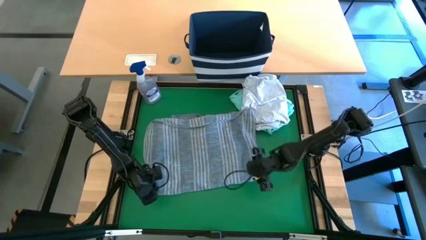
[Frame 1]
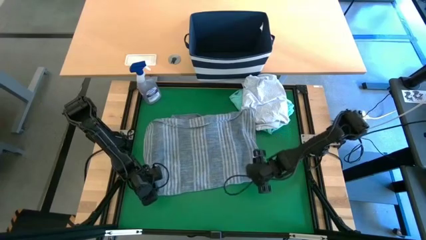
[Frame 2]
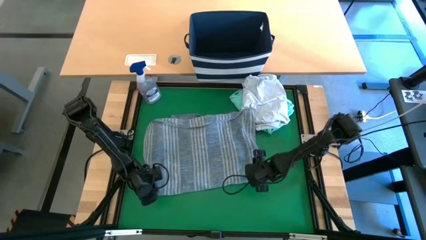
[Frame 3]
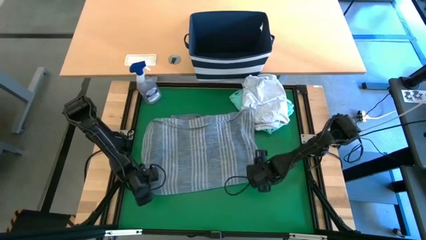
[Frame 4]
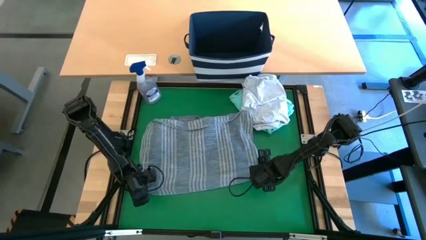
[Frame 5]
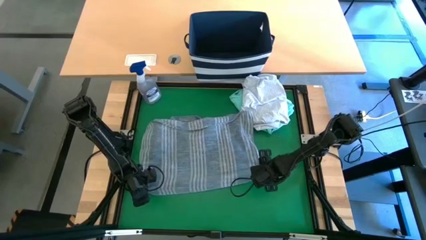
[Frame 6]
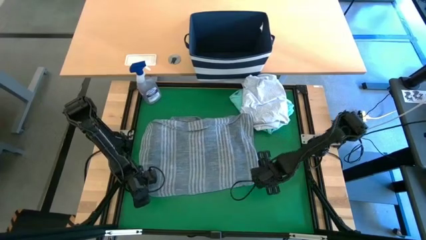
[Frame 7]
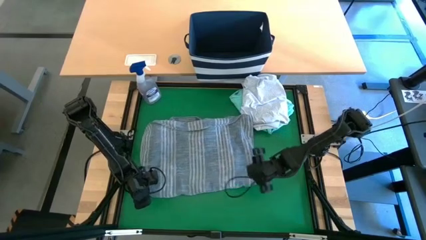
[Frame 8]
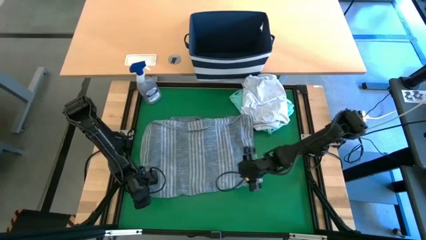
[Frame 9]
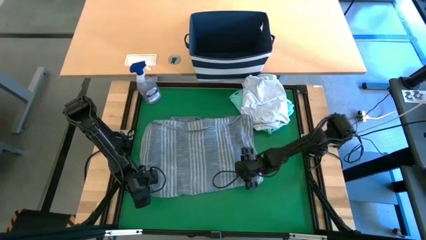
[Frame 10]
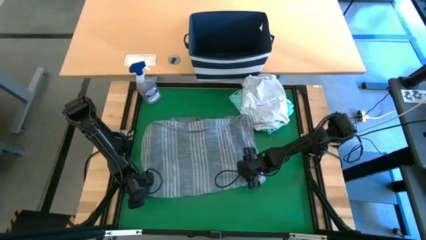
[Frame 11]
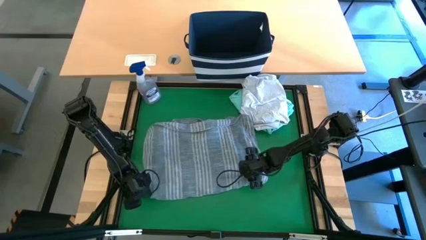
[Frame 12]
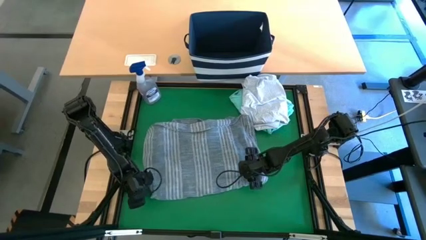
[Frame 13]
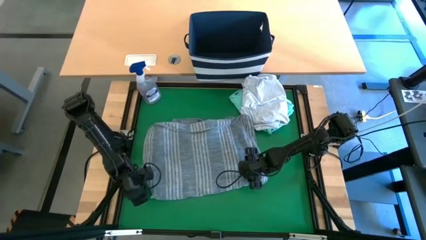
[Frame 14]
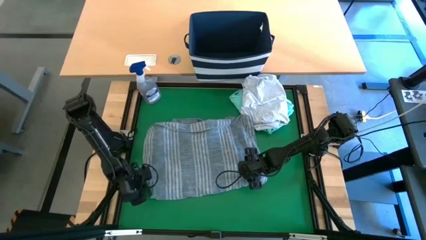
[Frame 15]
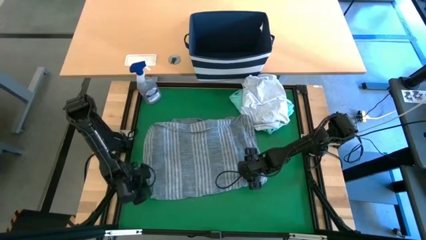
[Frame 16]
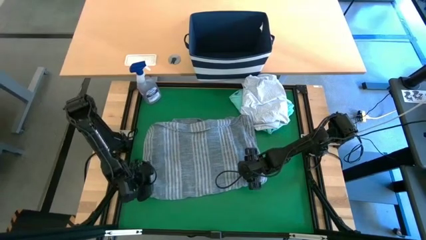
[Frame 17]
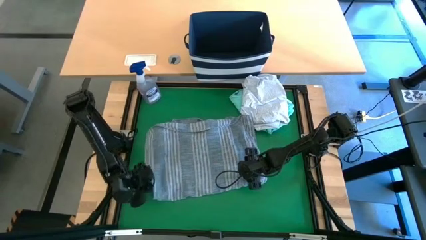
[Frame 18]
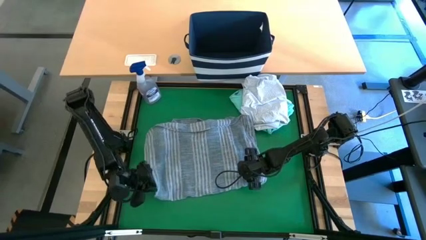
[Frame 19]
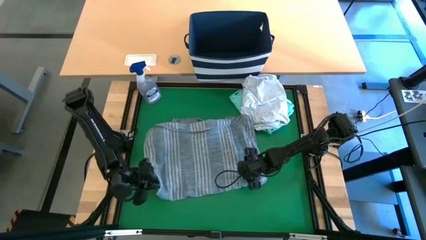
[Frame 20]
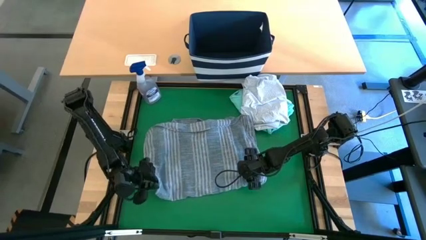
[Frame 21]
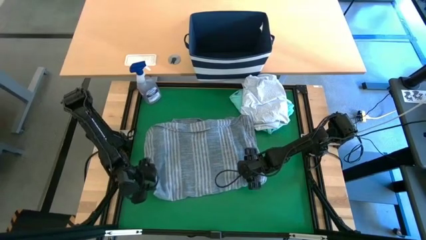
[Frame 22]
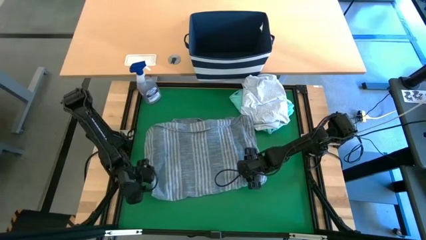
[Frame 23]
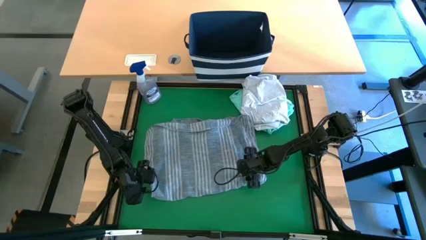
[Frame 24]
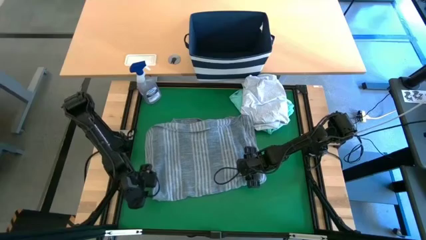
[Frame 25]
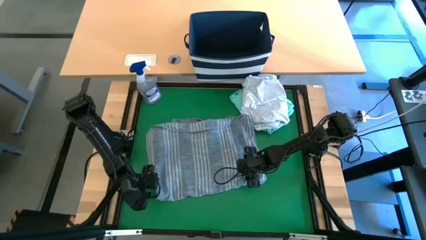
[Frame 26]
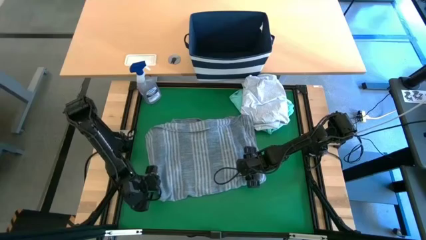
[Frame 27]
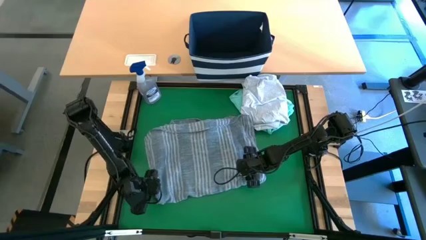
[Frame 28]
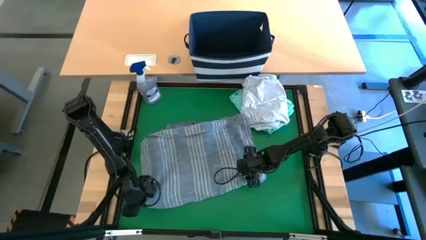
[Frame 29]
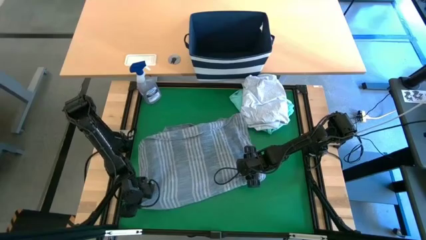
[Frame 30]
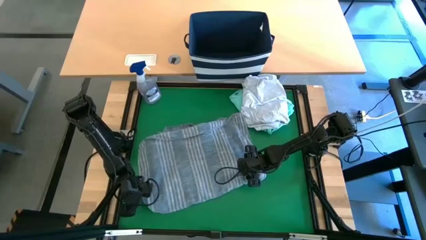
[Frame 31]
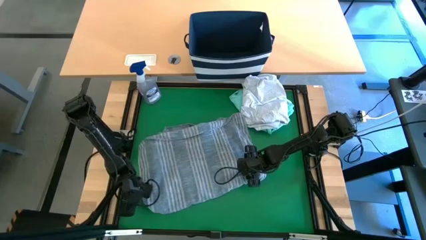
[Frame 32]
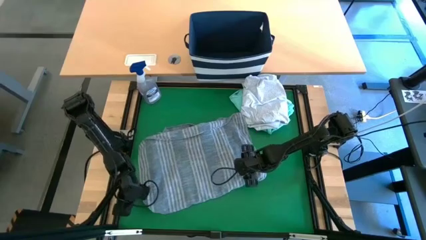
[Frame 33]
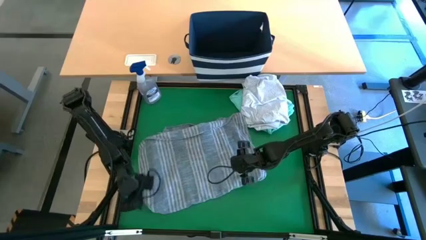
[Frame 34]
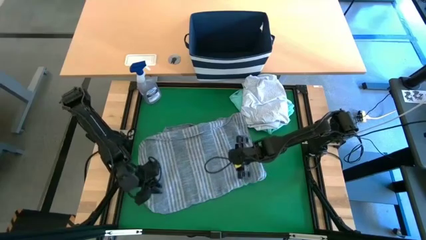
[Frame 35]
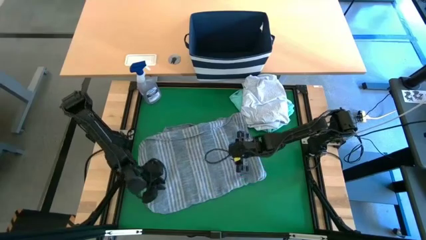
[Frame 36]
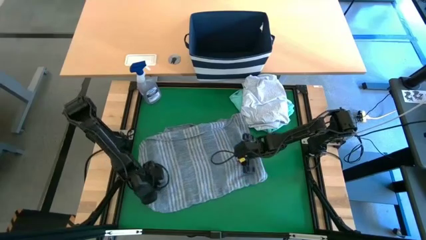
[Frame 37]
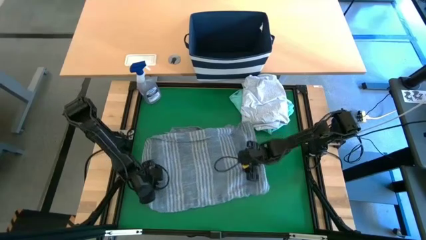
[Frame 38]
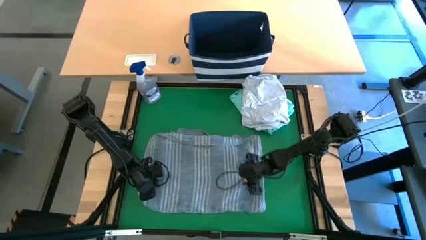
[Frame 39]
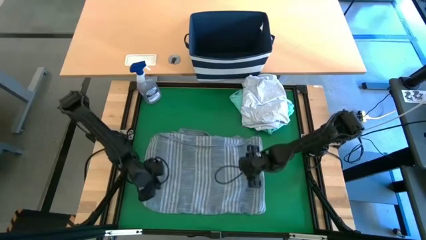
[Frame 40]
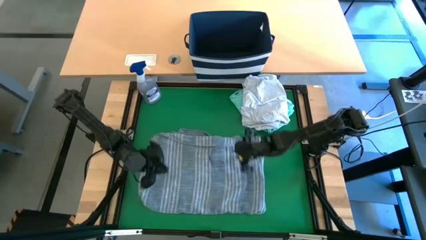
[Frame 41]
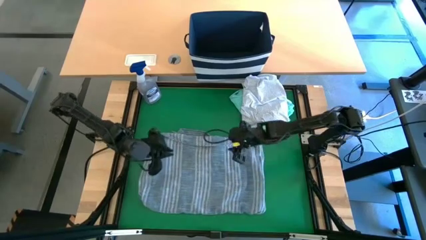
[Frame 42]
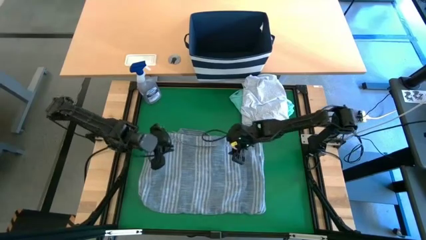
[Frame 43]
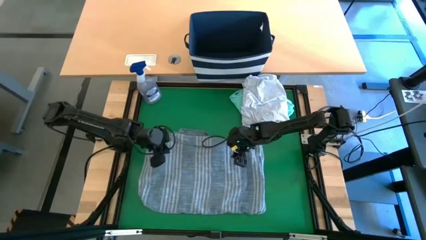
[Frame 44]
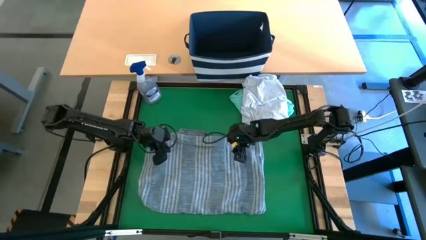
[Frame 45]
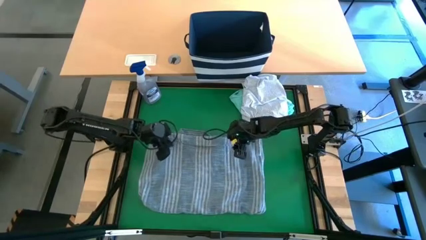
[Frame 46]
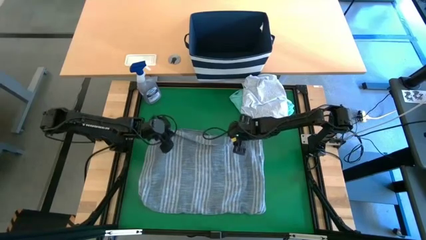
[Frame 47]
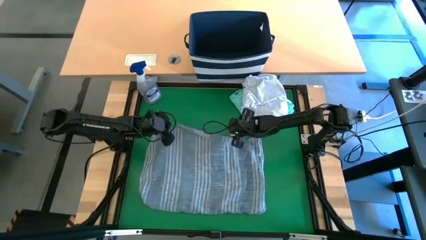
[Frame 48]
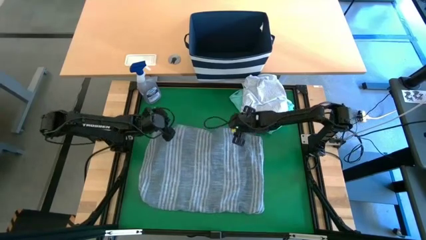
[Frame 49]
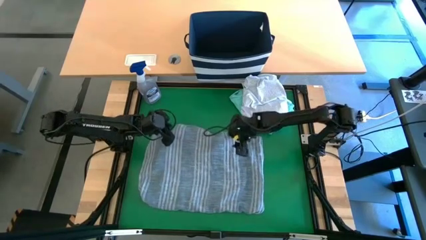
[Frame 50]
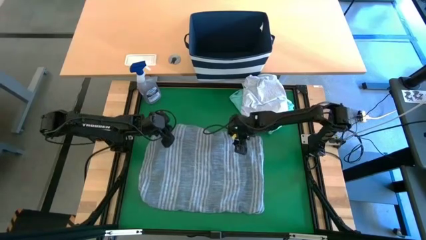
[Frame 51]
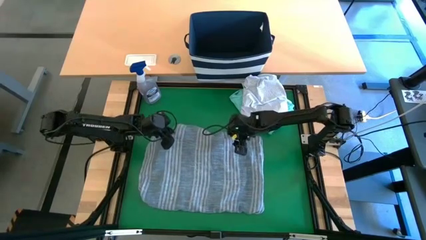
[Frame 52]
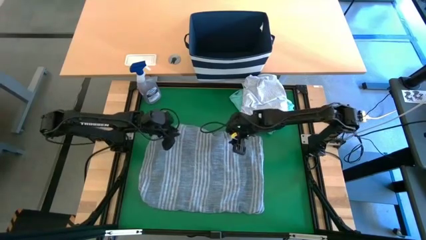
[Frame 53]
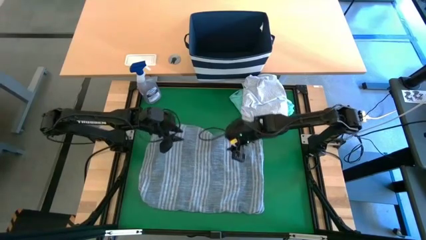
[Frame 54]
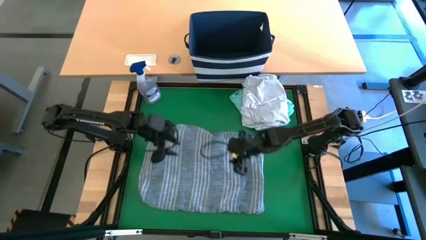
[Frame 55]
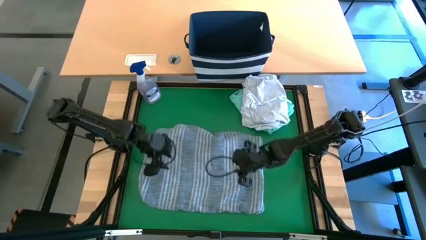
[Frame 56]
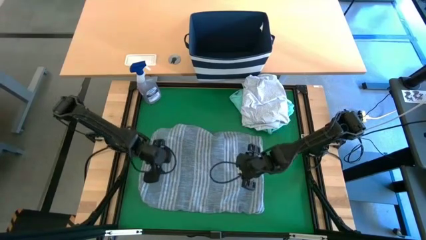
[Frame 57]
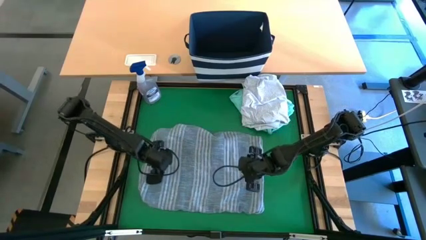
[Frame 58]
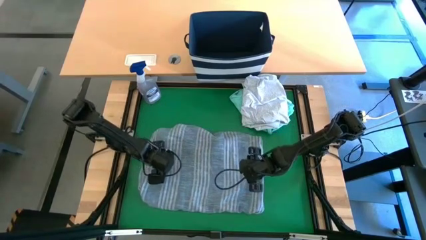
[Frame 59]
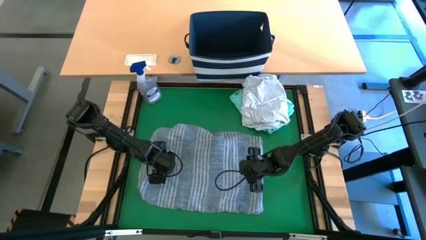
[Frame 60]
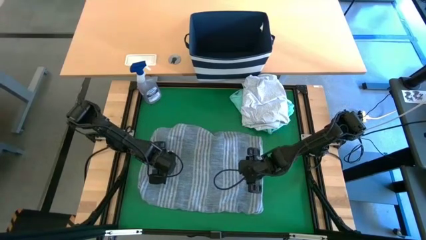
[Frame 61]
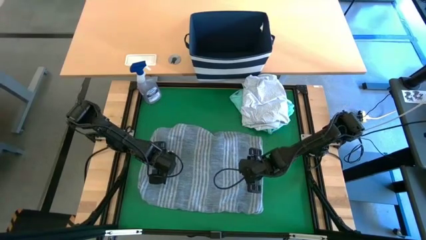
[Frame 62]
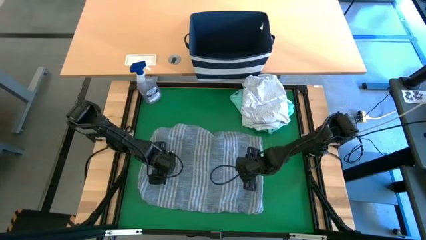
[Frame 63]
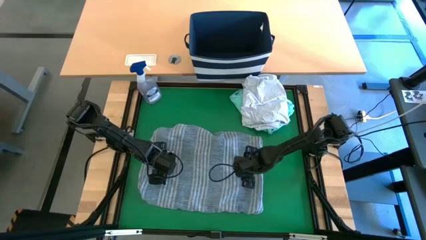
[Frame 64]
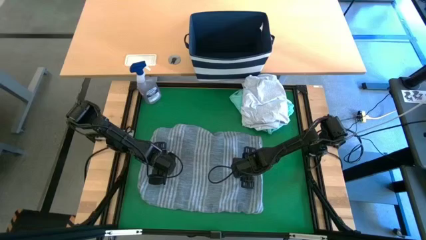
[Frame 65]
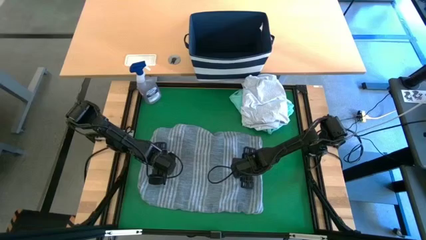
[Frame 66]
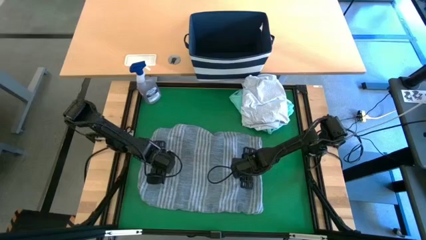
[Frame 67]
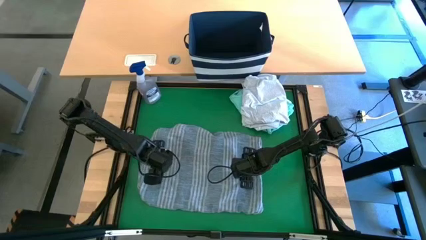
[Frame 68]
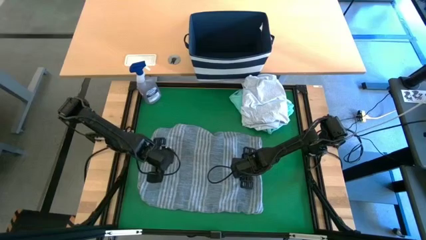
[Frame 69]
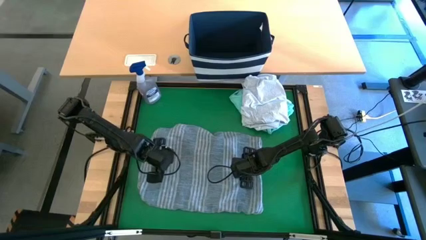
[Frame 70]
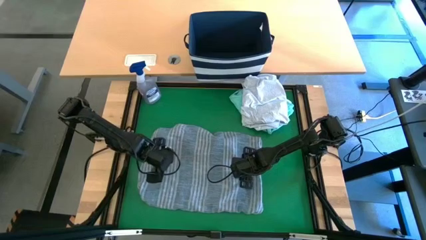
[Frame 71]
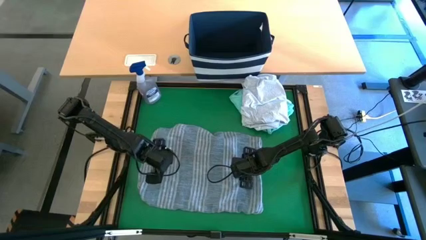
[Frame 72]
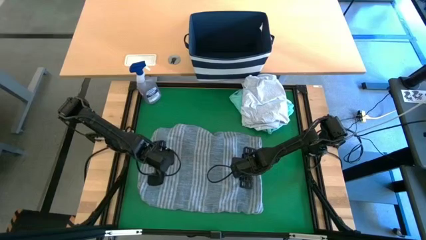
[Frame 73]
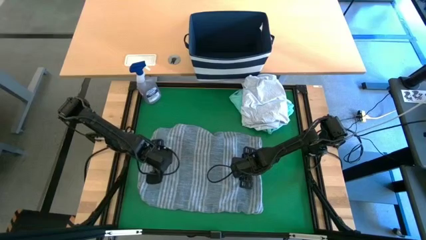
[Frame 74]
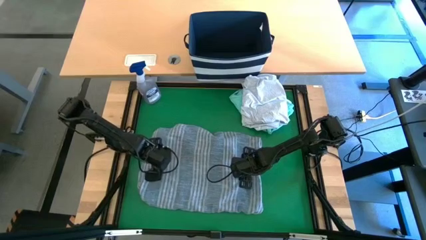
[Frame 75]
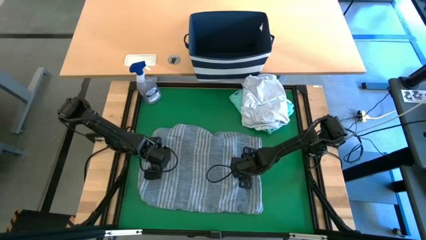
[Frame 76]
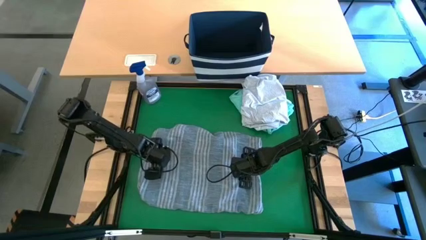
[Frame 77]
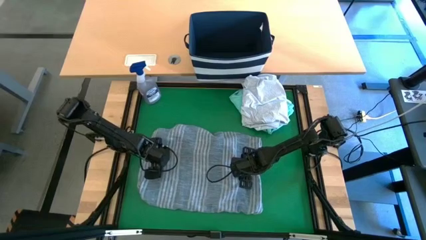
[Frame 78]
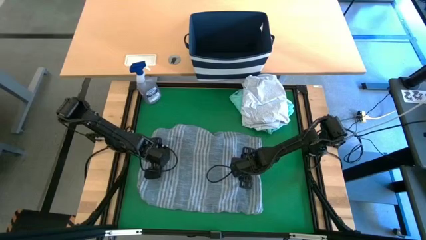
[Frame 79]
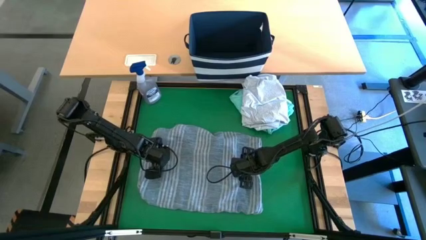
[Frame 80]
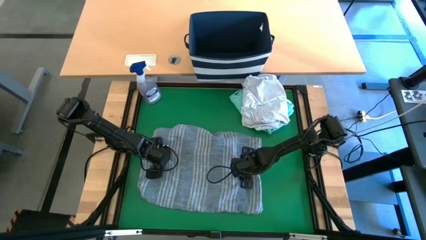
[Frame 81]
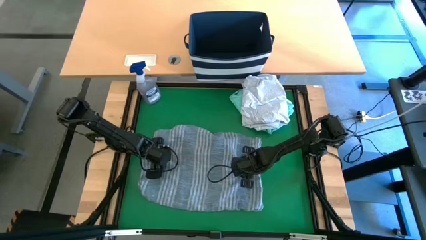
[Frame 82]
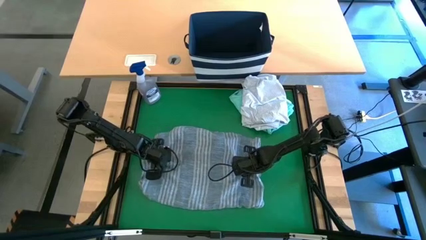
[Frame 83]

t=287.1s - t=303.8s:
Task: Fold laundry
Fold the blue polo shirt
